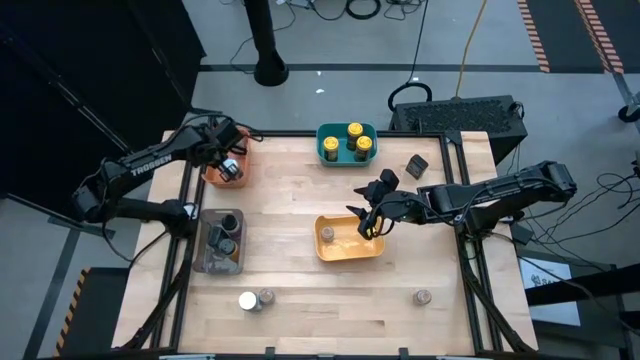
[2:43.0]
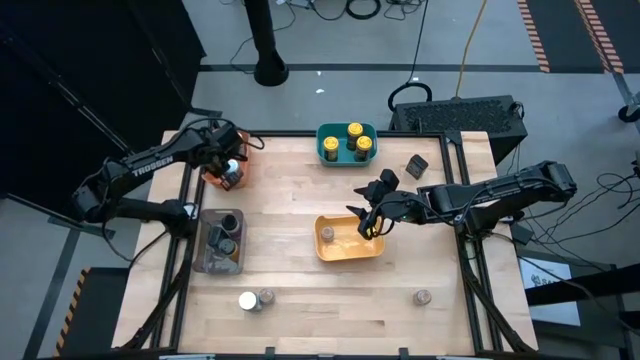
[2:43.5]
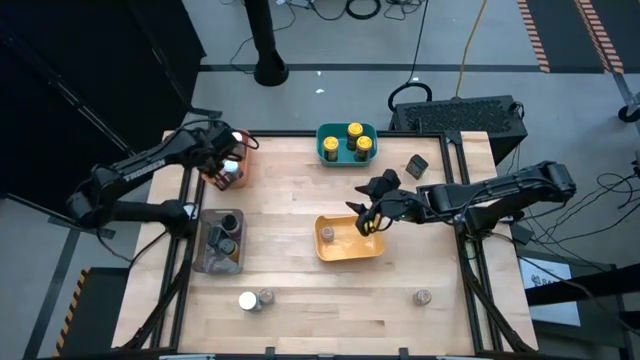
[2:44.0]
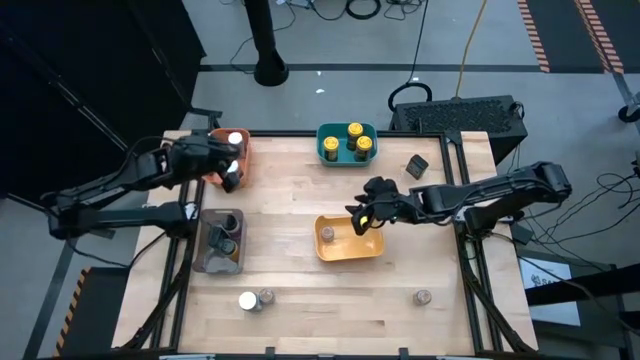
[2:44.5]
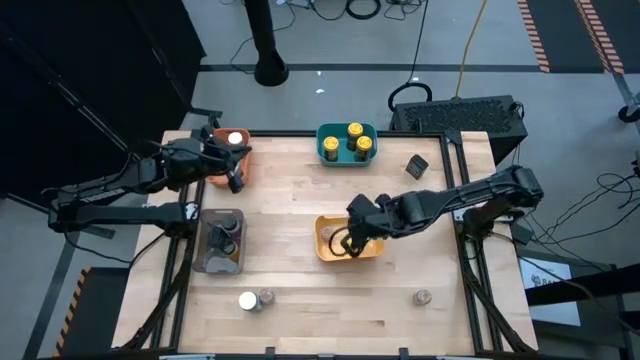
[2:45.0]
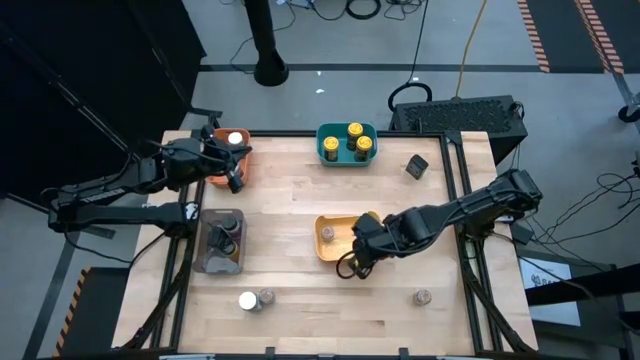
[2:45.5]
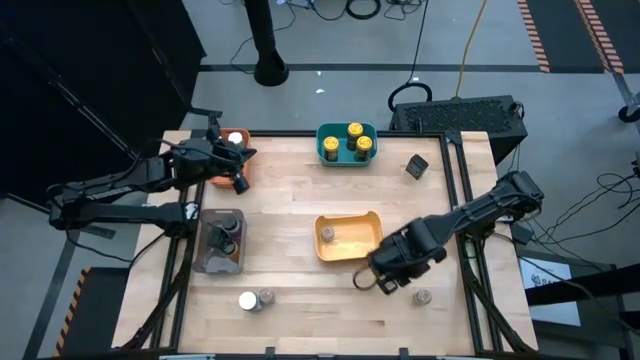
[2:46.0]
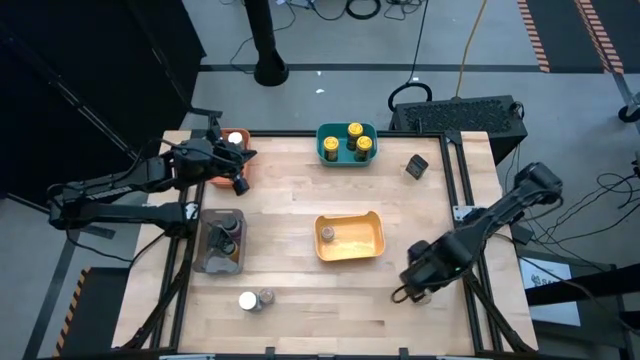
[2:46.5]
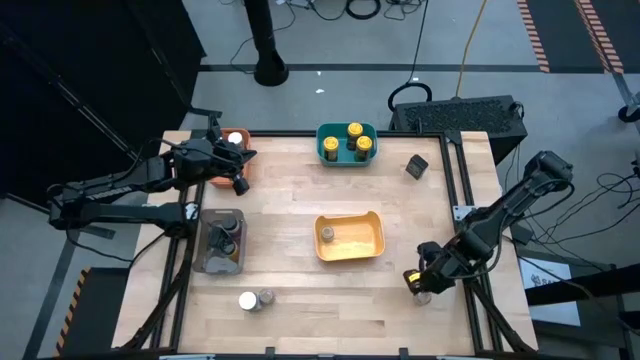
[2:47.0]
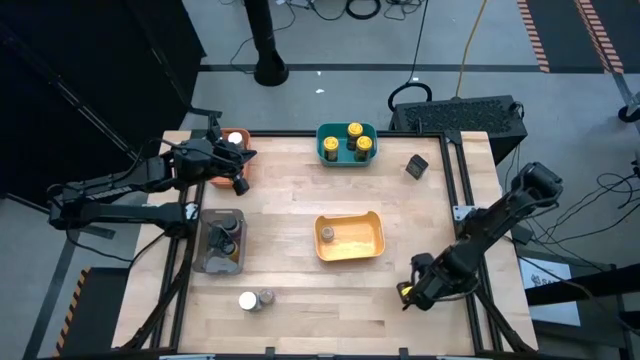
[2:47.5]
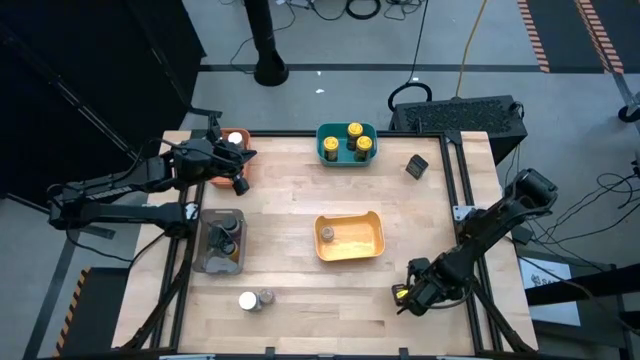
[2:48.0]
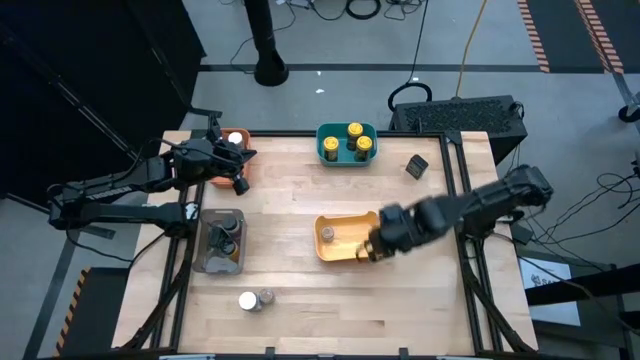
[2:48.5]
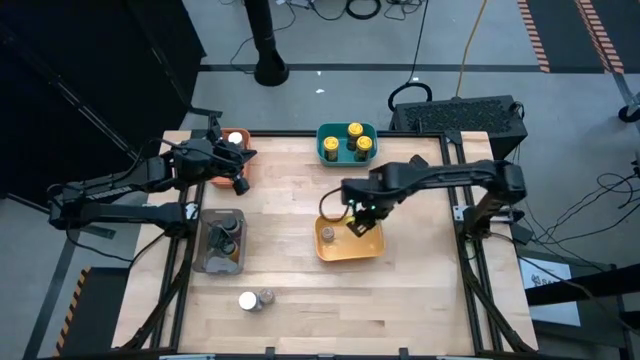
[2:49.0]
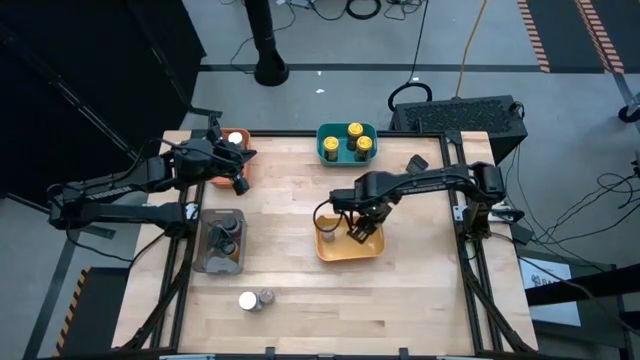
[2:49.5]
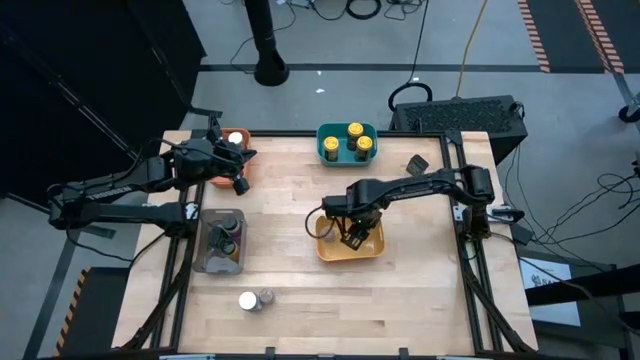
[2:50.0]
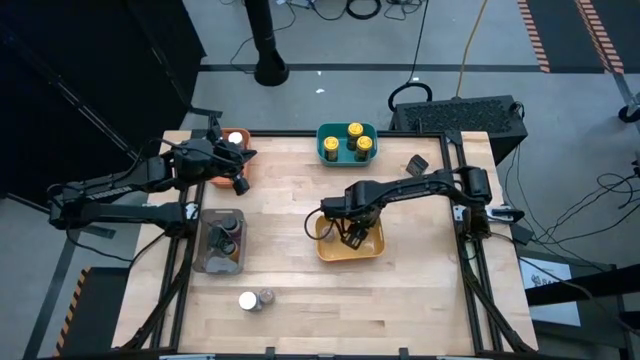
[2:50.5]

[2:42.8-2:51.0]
Task: Sort spices by type
Put the right brown spice bottle into the yellow bin

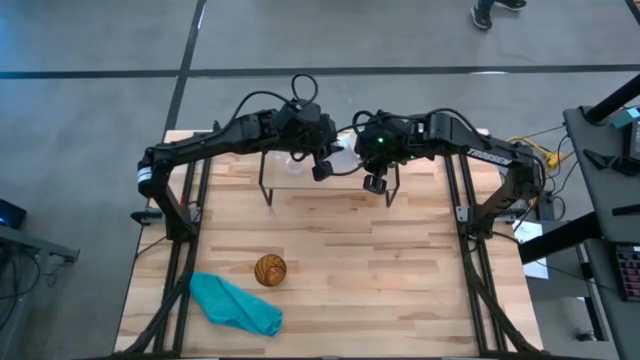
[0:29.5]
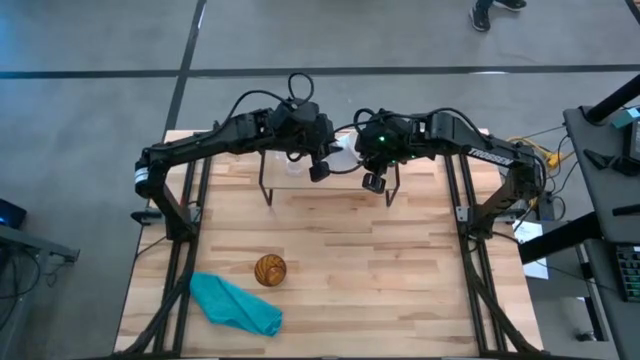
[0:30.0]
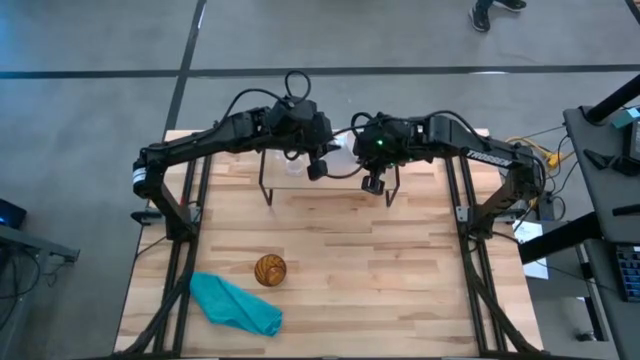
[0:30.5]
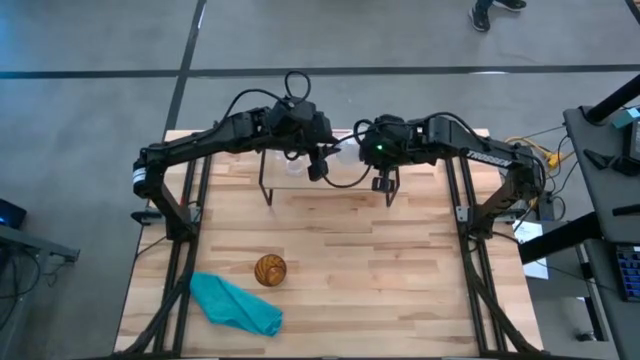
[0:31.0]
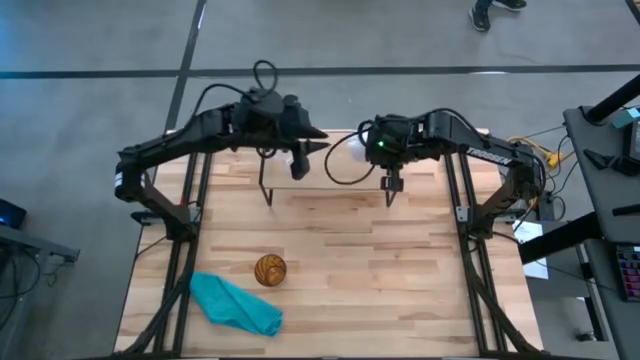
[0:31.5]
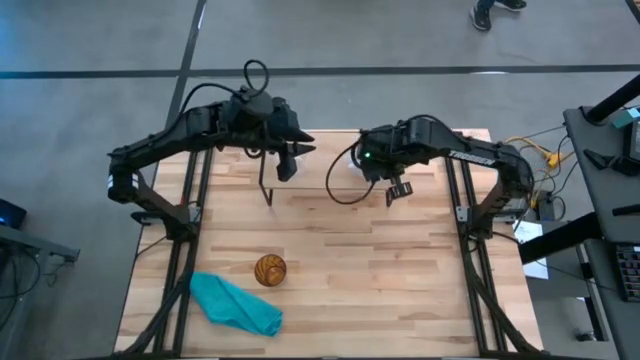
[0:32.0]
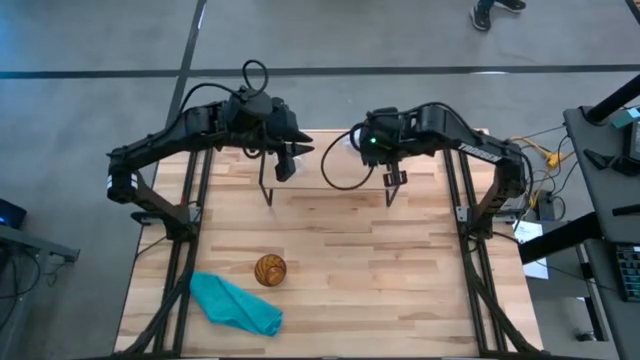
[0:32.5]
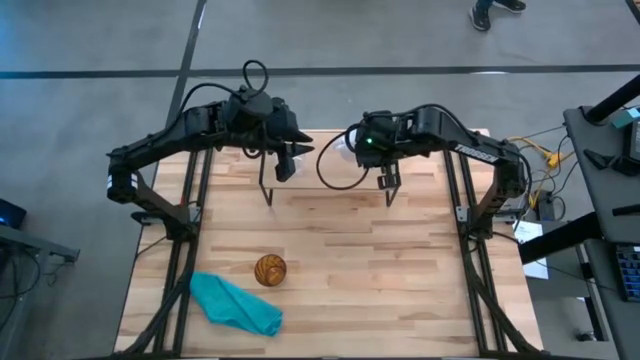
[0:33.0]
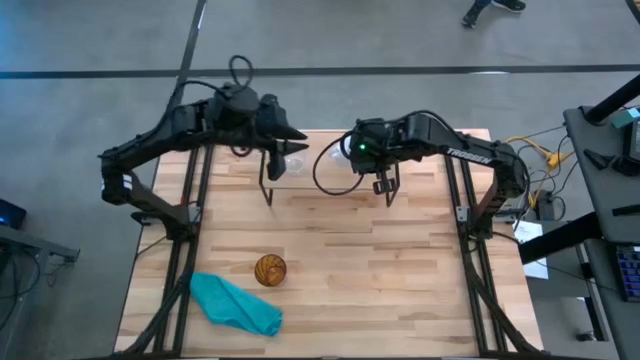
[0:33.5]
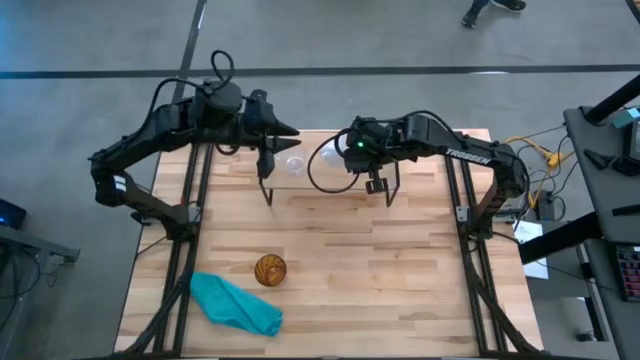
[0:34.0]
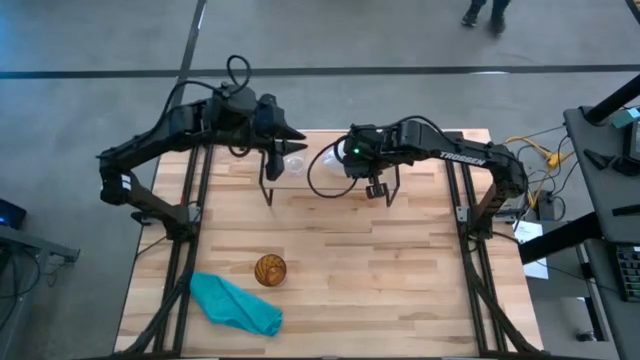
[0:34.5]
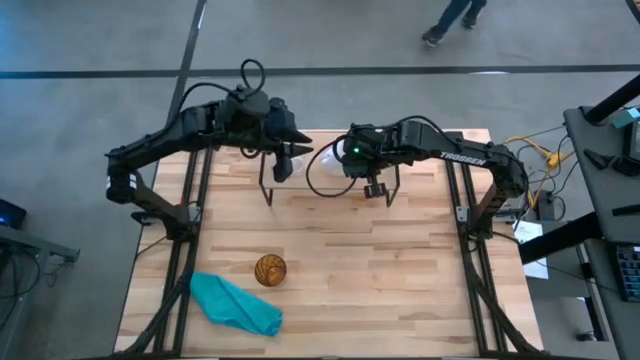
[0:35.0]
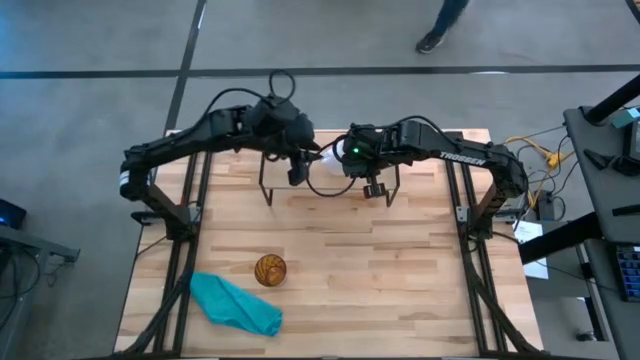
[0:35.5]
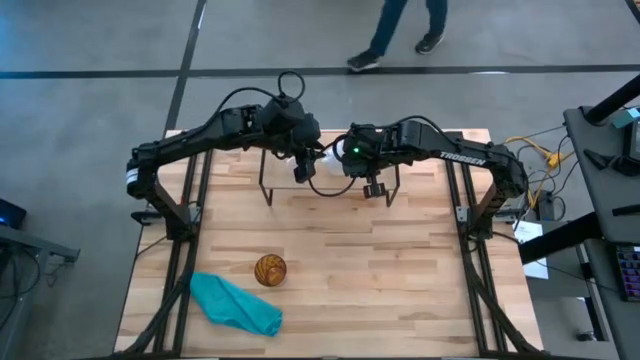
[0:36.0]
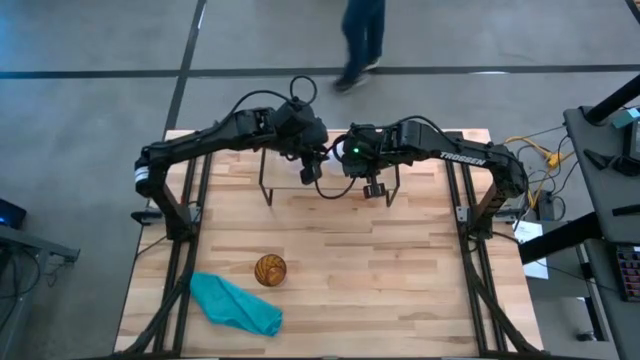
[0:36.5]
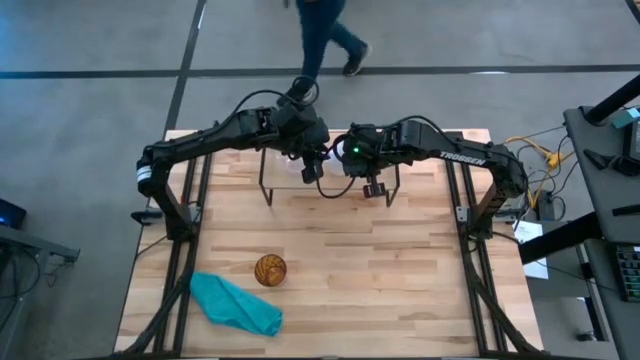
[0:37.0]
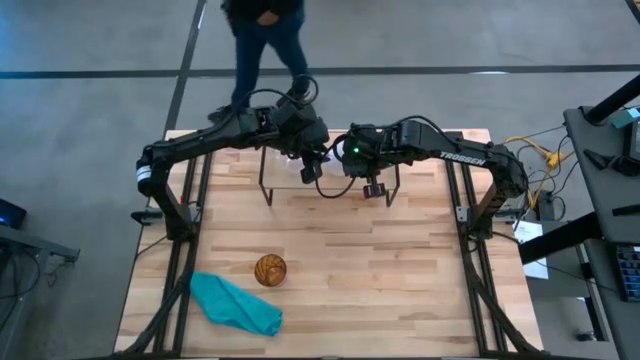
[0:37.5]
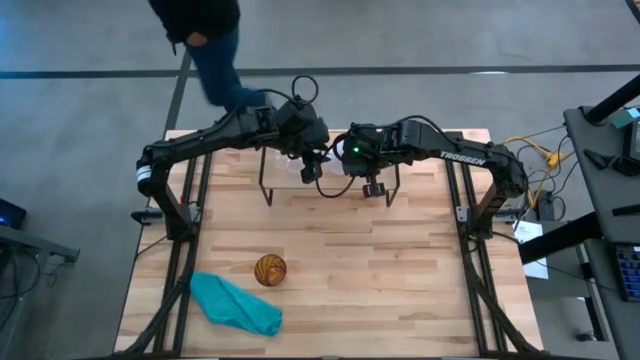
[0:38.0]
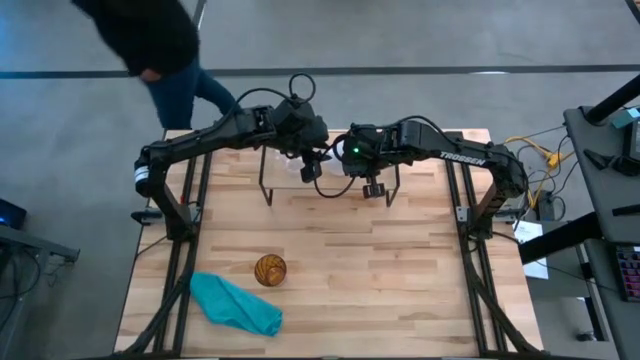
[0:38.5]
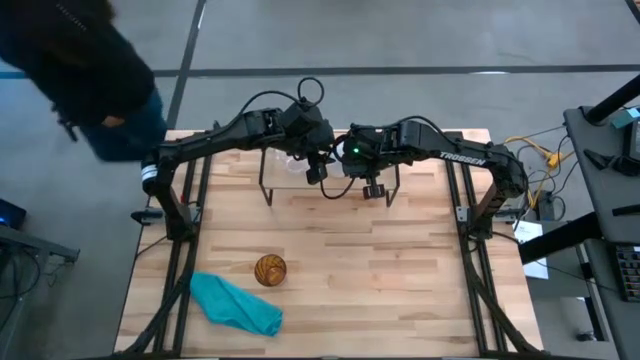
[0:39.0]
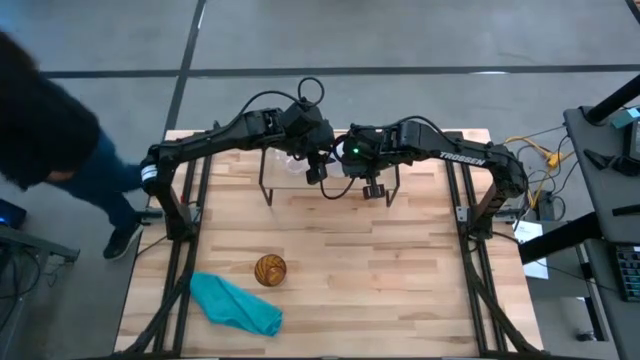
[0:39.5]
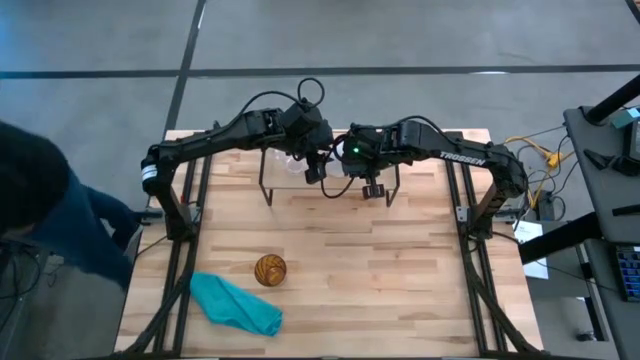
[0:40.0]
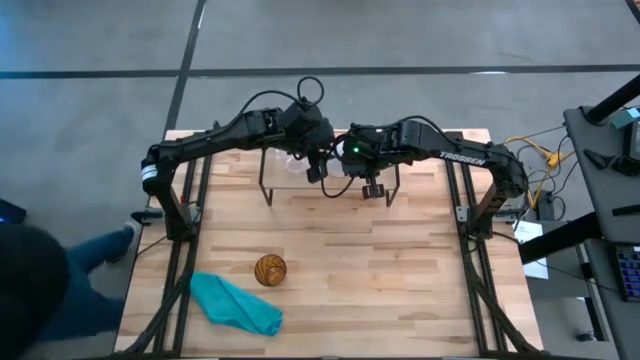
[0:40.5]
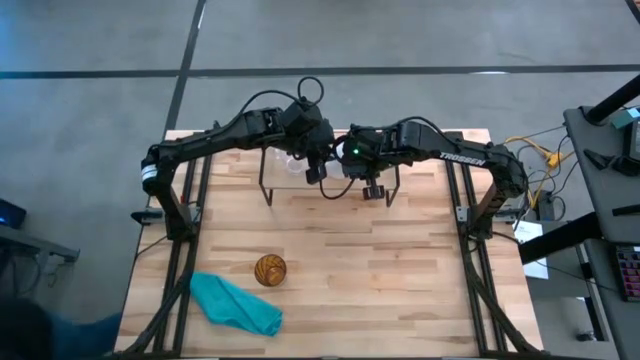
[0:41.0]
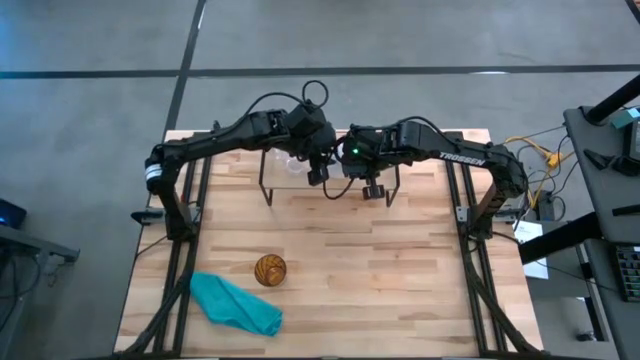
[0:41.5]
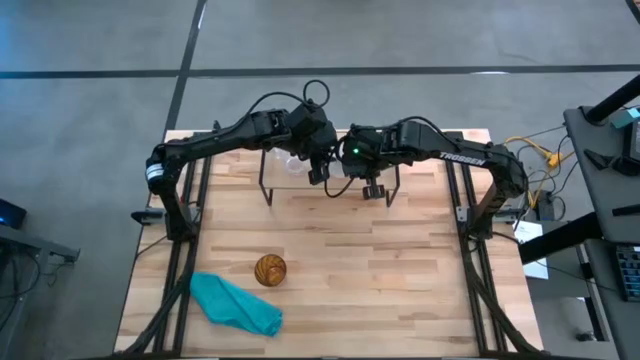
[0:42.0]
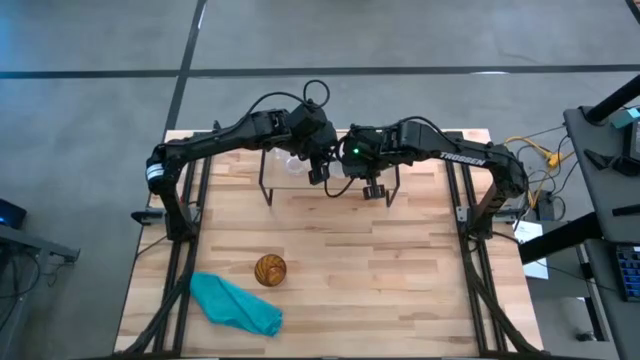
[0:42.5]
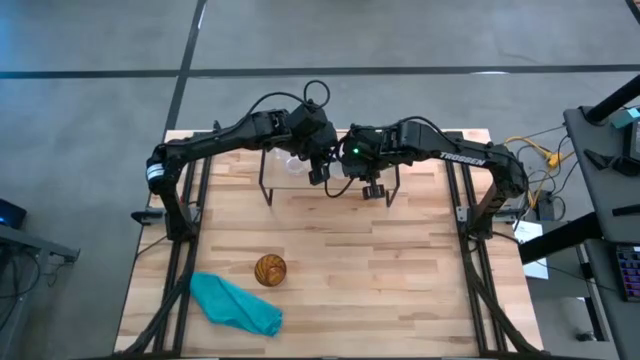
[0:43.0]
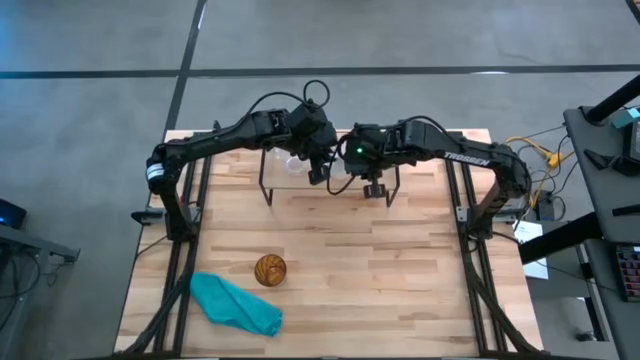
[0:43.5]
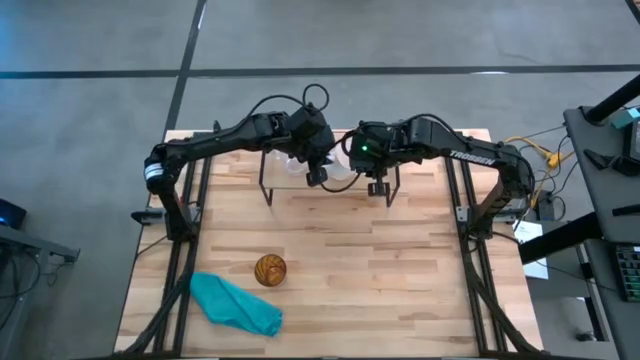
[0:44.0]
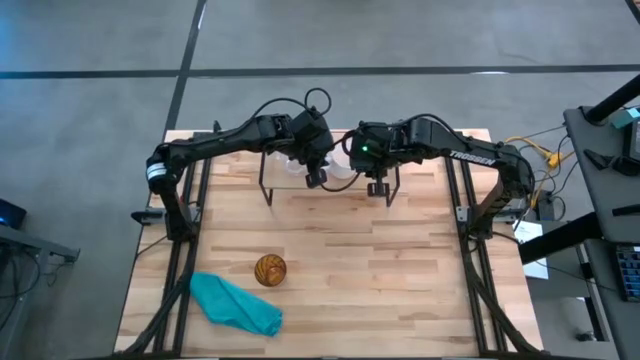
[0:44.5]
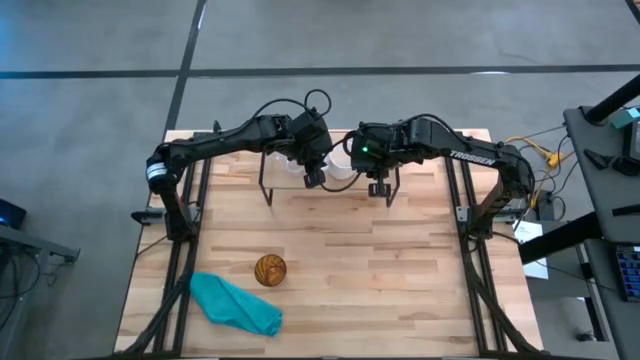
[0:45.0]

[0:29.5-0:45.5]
Task: Stack small to large cups/mugs on shelf
Put the white mug on the shelf
